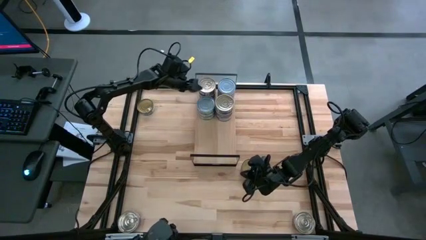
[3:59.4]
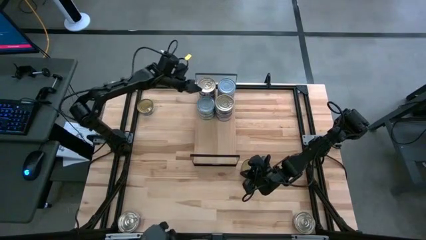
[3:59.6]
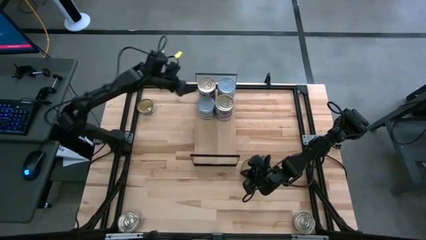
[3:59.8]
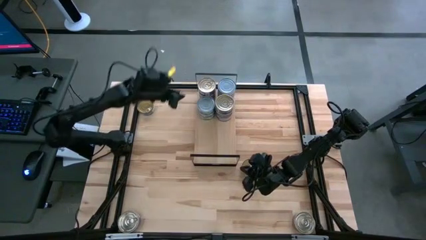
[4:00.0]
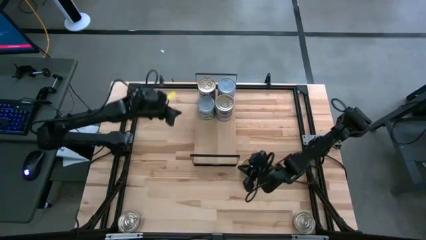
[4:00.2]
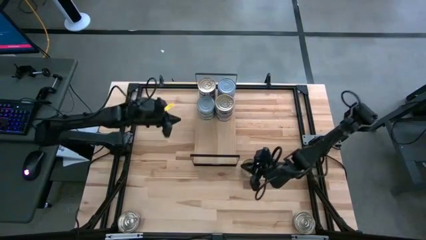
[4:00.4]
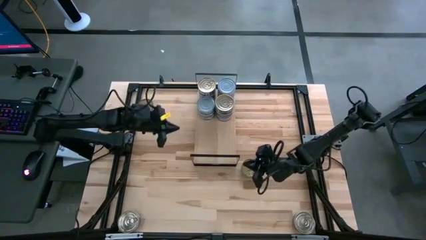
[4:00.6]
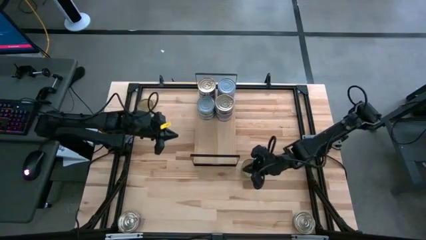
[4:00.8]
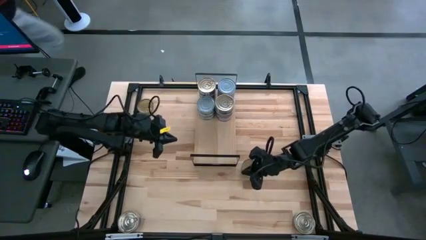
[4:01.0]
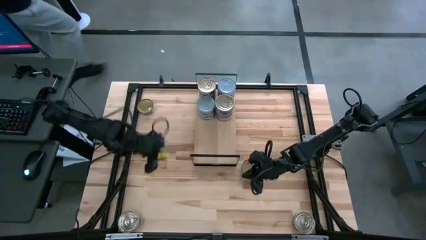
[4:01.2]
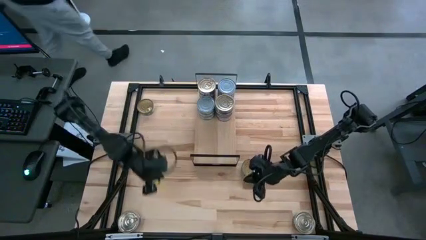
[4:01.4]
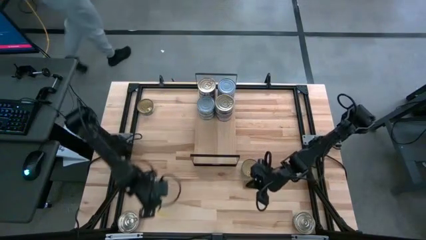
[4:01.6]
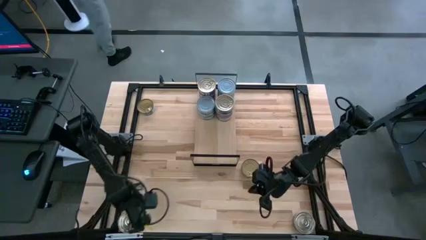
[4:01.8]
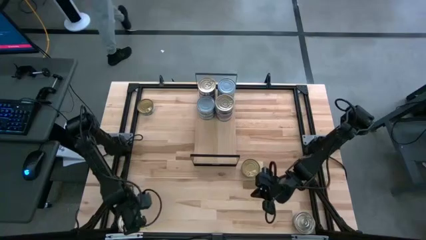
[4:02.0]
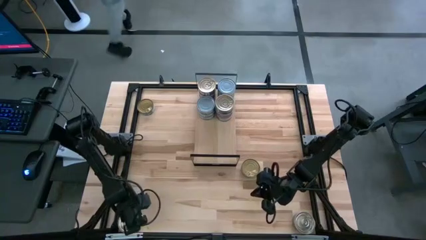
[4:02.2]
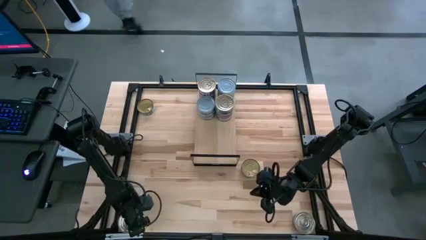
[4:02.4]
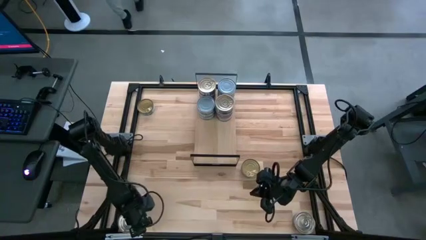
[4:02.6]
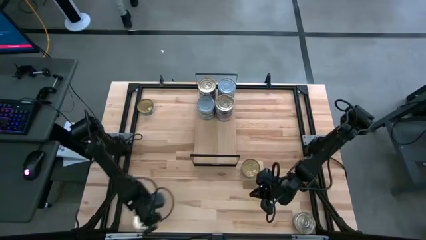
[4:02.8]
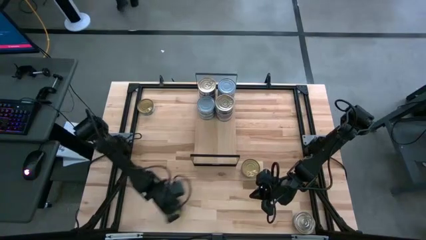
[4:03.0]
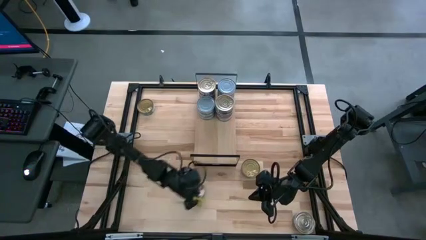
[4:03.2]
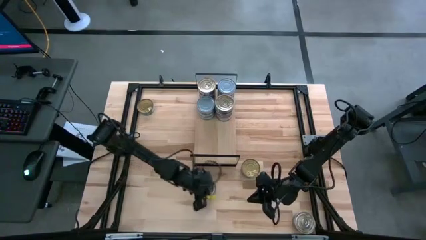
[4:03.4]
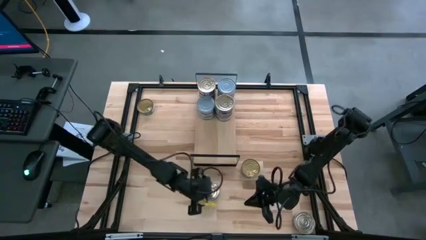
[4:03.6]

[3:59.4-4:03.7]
Task: Stack canned seafood by type on shelf
Move the pink and blue tuna can to the bottom middle of the table

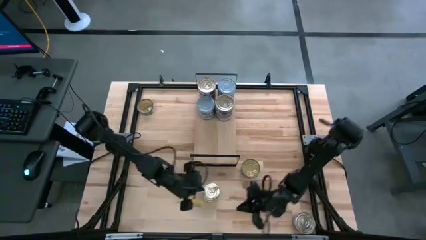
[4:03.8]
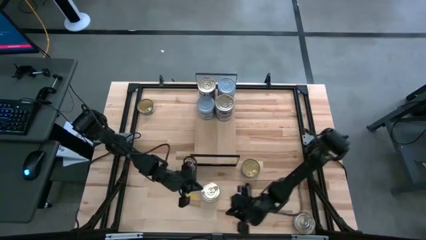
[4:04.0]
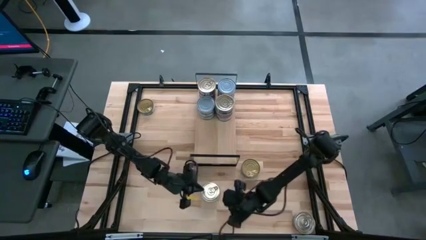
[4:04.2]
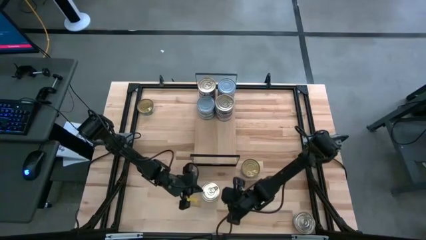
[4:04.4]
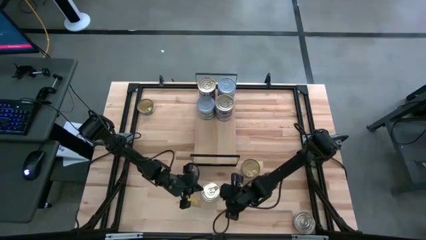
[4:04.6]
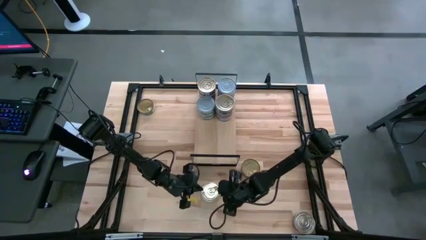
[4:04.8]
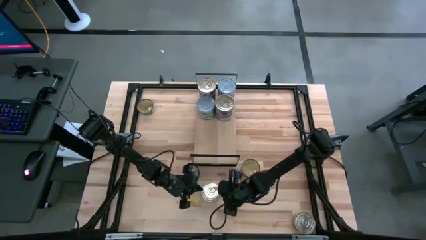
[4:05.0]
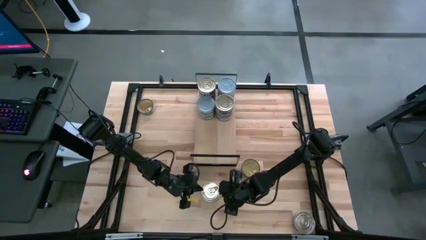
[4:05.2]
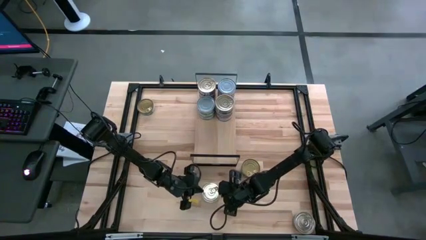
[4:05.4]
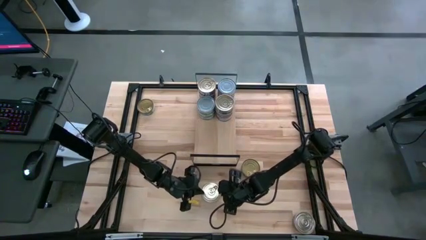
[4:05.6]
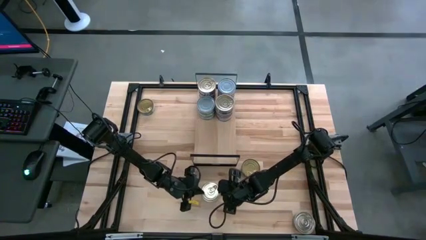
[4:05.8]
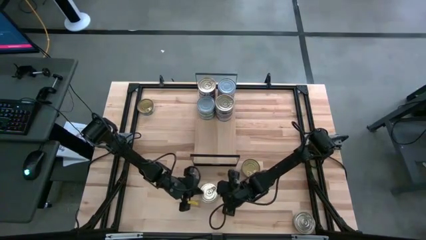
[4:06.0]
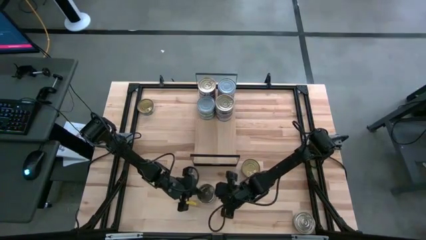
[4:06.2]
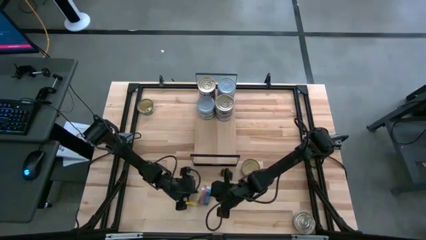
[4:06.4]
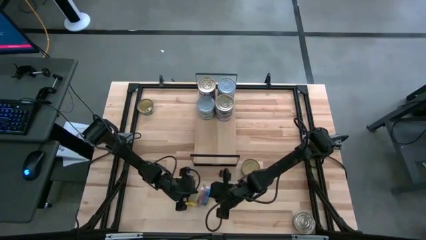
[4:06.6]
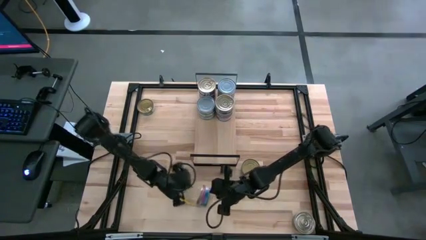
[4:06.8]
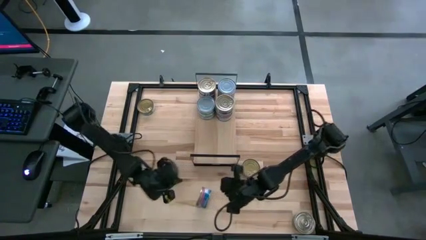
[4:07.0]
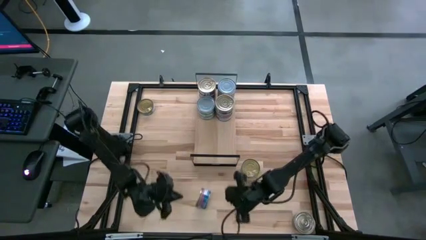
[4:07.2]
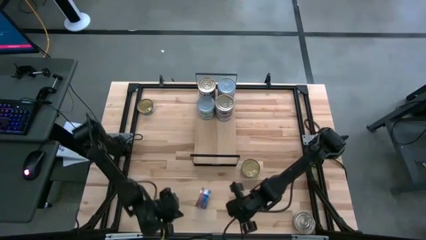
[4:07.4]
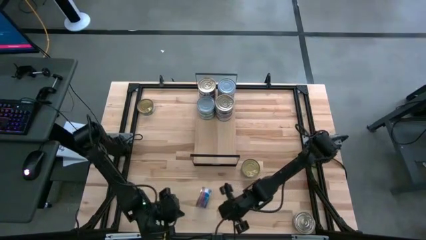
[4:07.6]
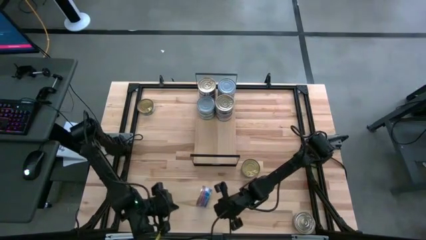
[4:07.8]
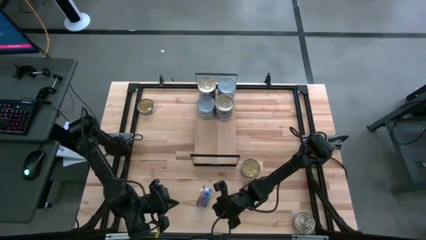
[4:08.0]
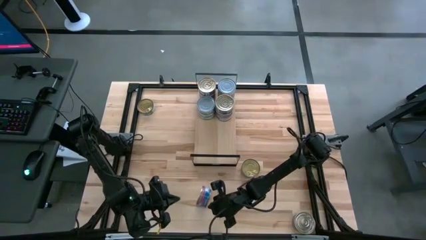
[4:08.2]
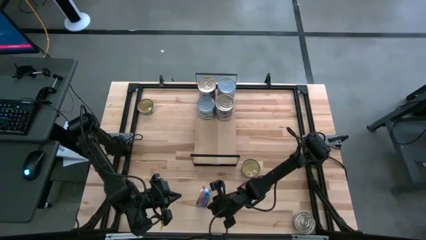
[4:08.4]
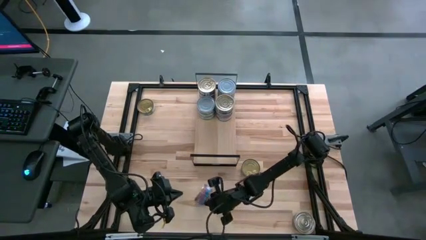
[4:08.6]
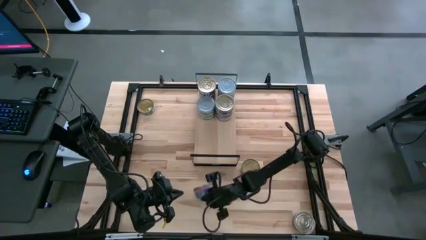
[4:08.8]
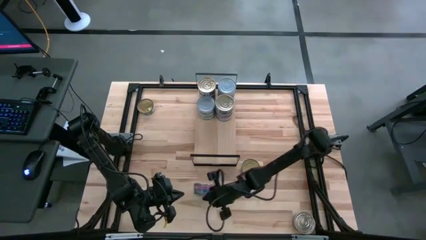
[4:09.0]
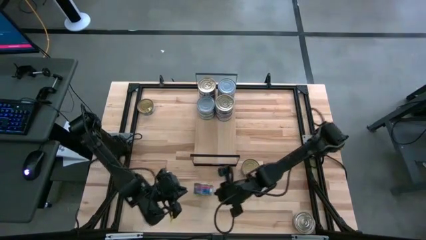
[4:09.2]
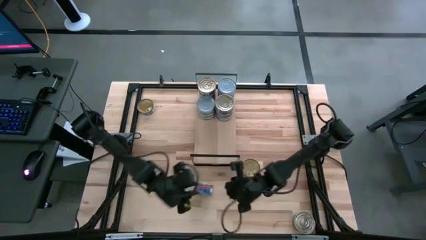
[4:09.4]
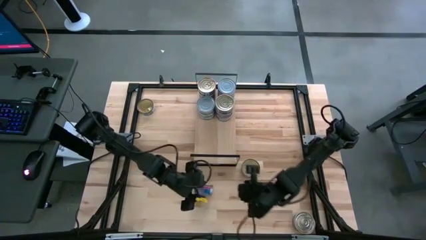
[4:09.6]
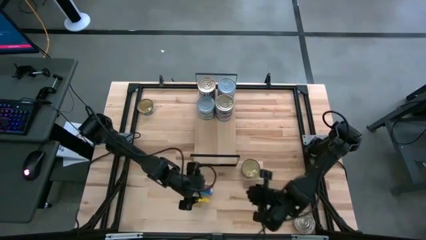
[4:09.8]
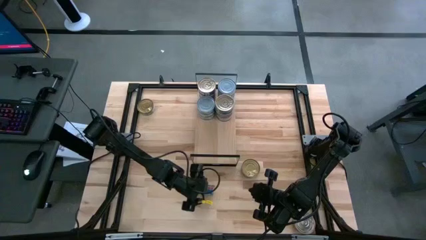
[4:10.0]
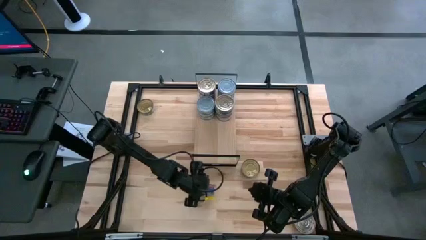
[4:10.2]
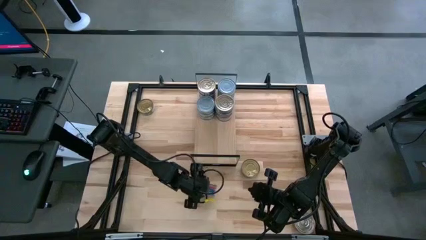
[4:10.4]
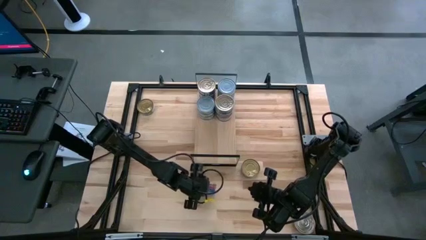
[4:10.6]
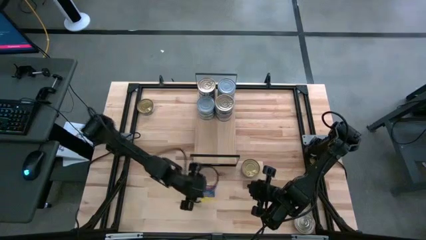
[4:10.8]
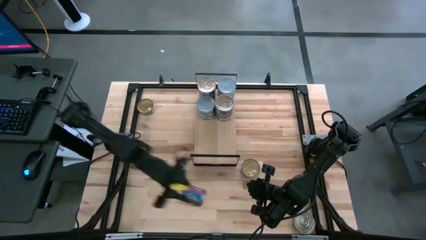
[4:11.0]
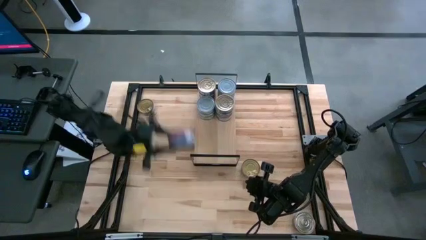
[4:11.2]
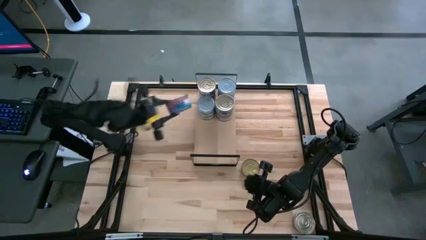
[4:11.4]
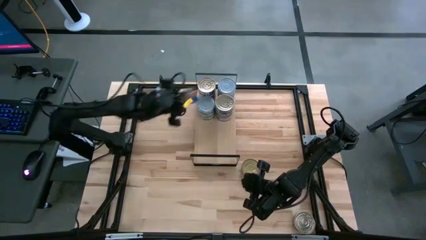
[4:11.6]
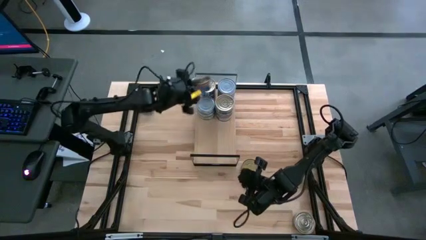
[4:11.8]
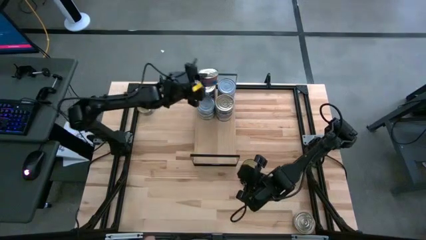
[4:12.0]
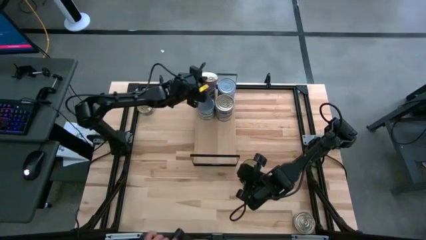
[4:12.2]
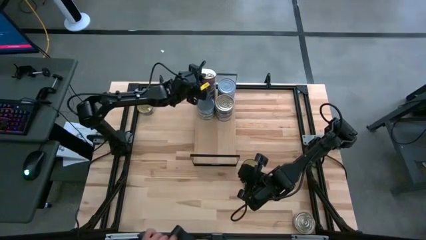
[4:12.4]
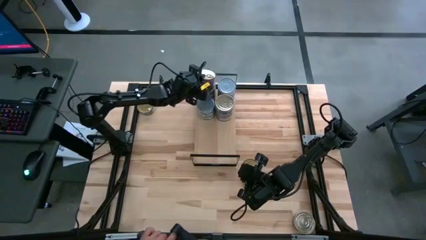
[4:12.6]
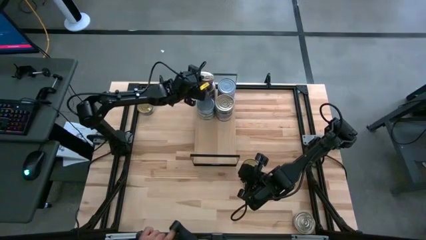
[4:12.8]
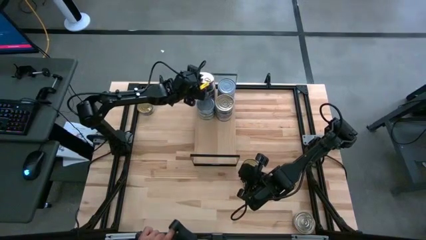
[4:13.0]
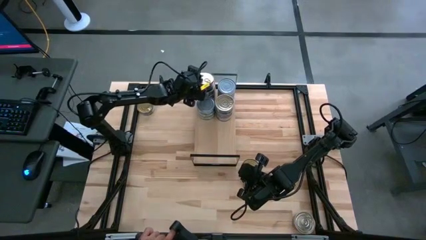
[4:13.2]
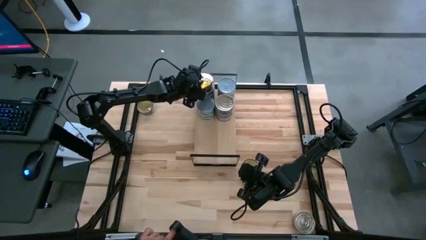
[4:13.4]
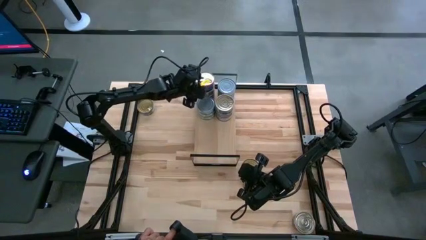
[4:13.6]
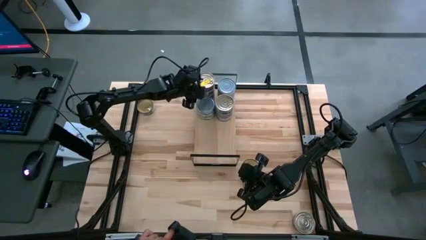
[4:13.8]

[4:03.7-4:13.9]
Stack the pink and blue tuna cans on top of the pink and blue tuna can

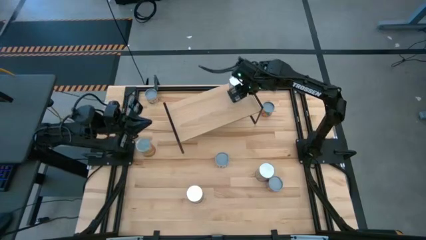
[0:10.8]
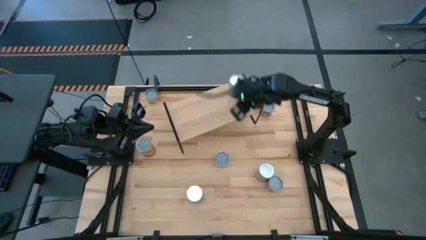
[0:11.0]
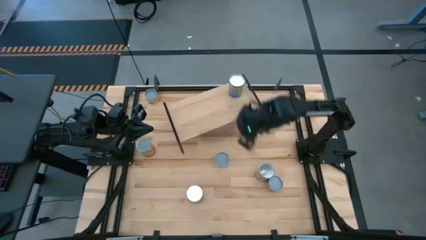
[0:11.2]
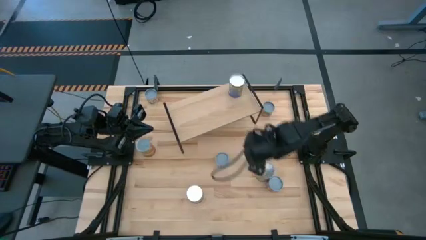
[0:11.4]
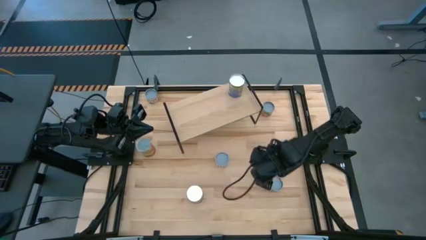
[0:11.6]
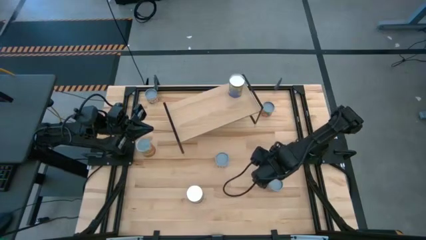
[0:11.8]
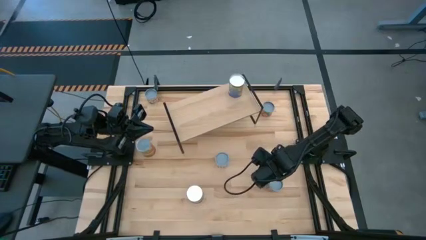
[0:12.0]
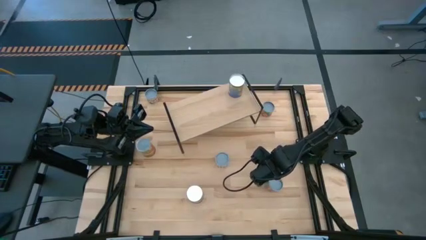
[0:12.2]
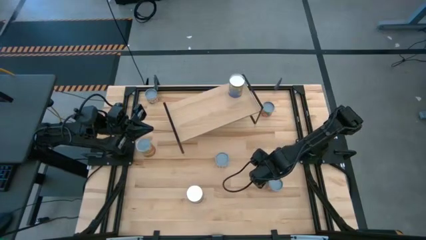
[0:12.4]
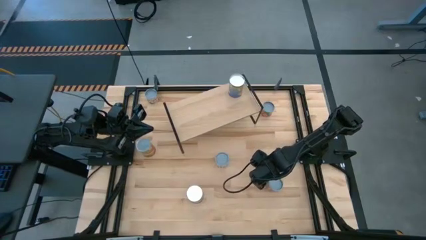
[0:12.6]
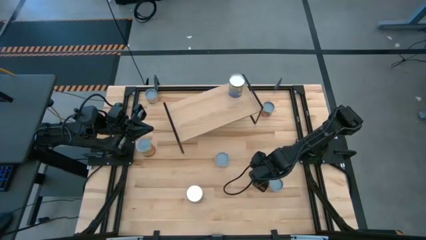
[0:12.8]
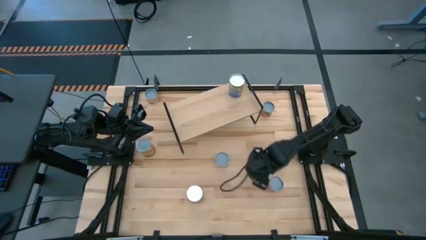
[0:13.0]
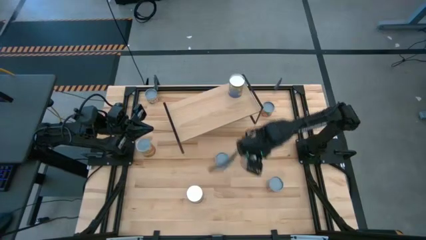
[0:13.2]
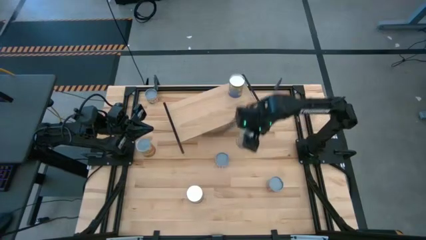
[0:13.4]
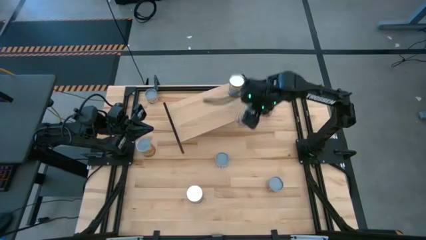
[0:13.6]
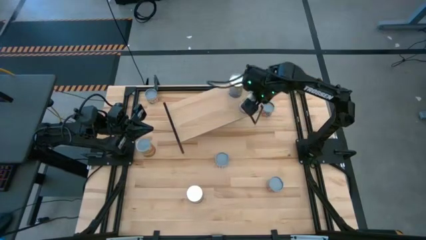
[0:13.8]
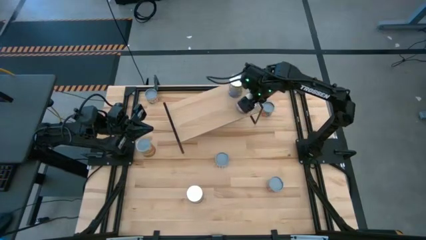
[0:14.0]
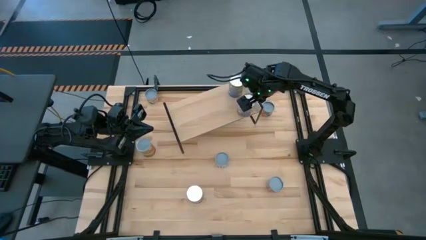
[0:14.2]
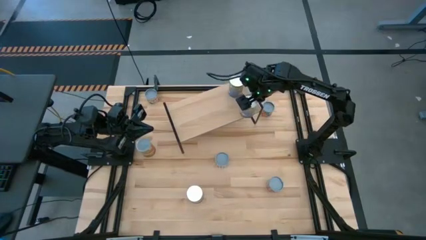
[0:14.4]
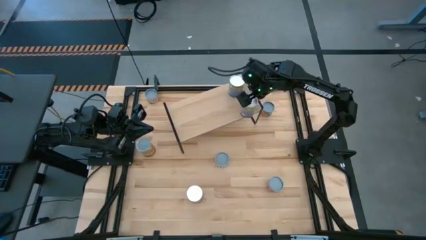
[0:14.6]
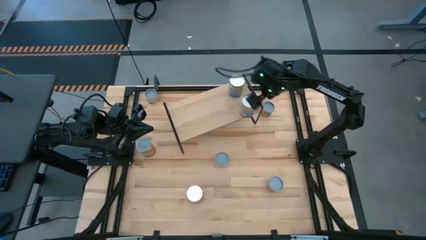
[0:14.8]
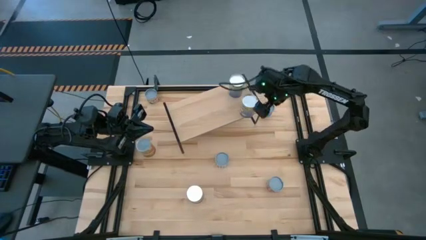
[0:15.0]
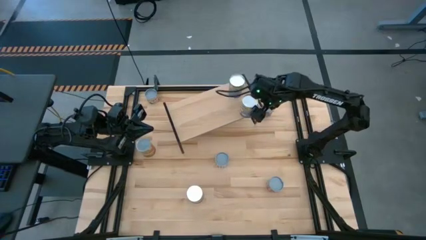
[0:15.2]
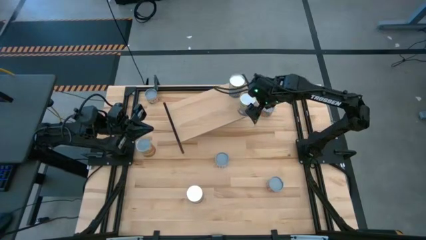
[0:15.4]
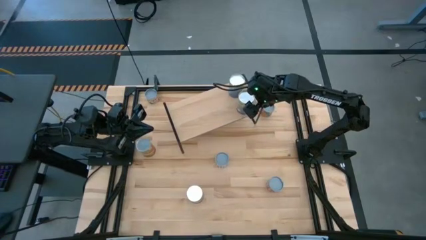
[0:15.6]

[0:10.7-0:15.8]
Task: Pick and place cans onto a shelf
Put the canned peaches on the shelf aligned with the other canned peaches
